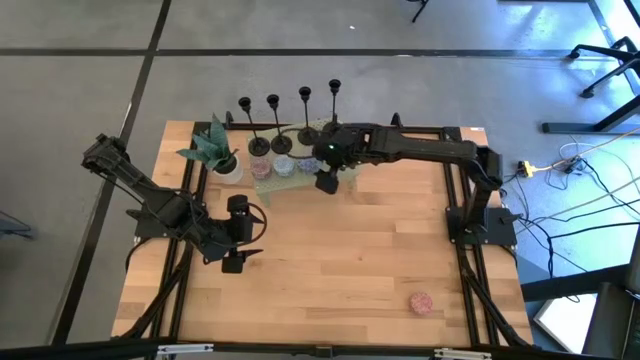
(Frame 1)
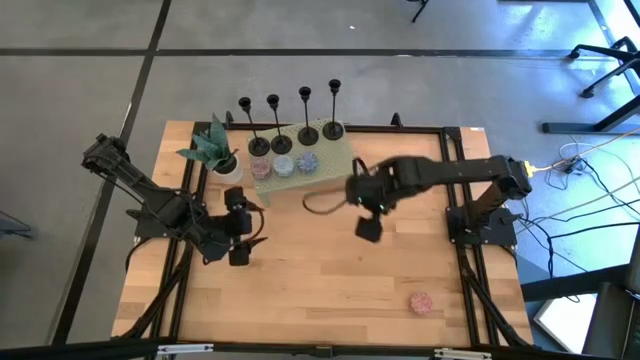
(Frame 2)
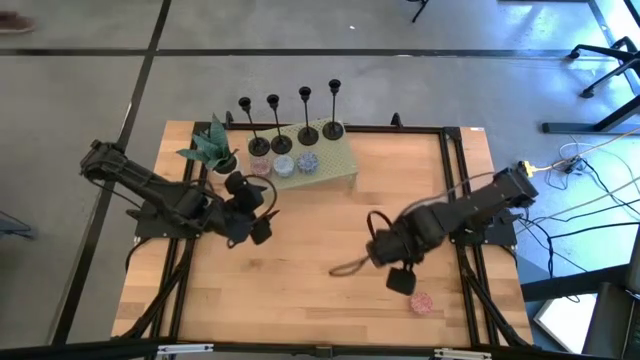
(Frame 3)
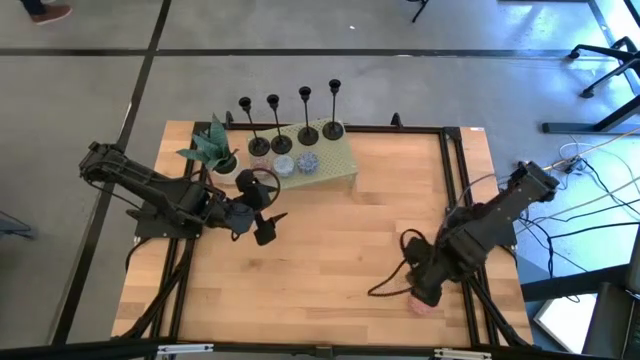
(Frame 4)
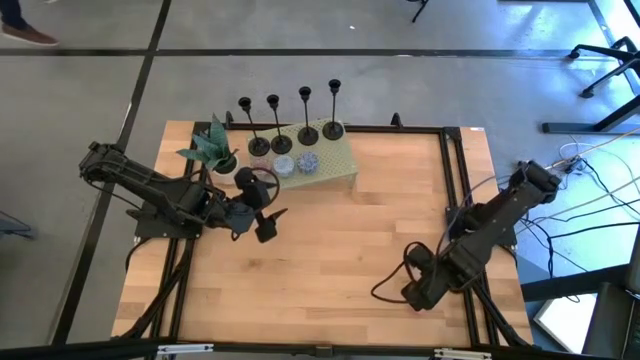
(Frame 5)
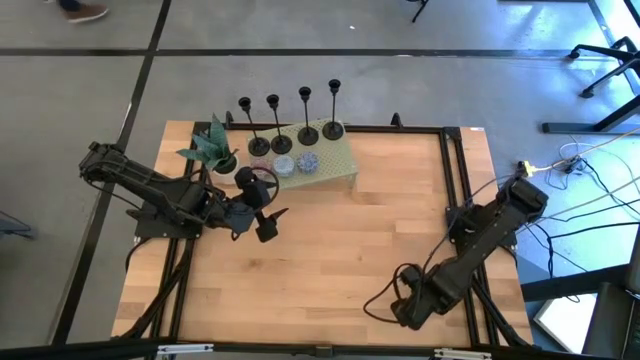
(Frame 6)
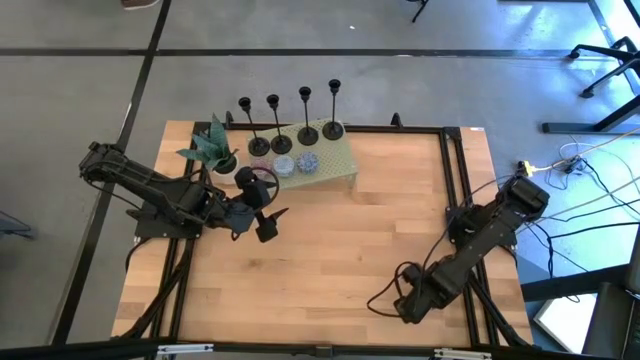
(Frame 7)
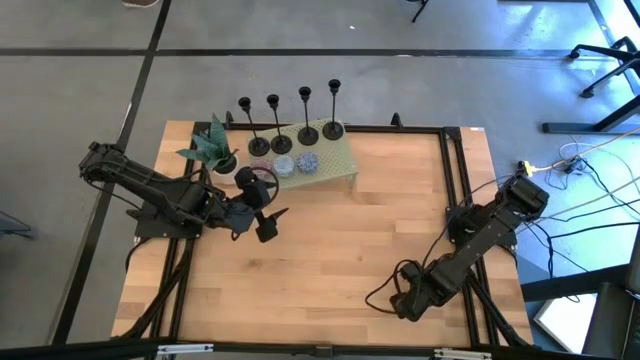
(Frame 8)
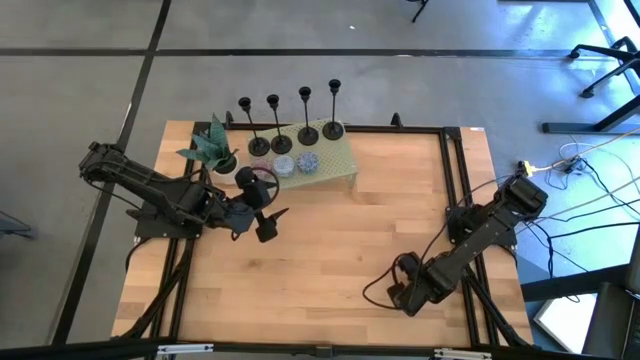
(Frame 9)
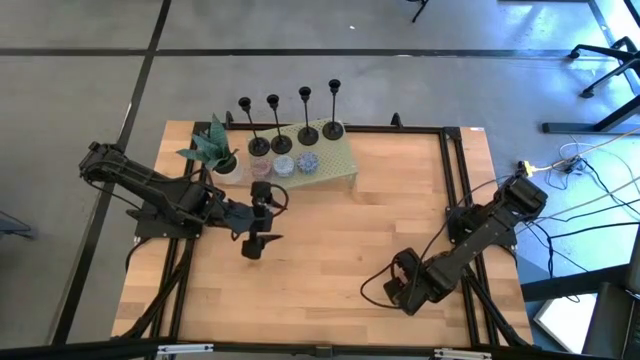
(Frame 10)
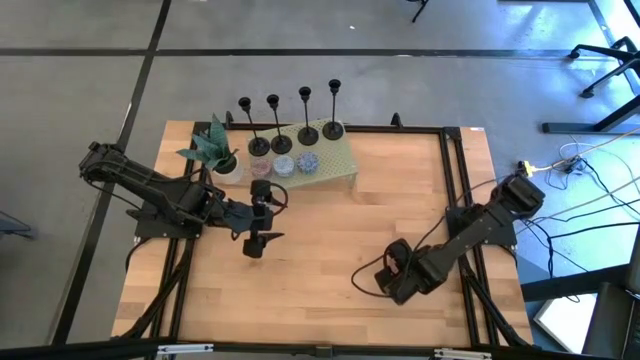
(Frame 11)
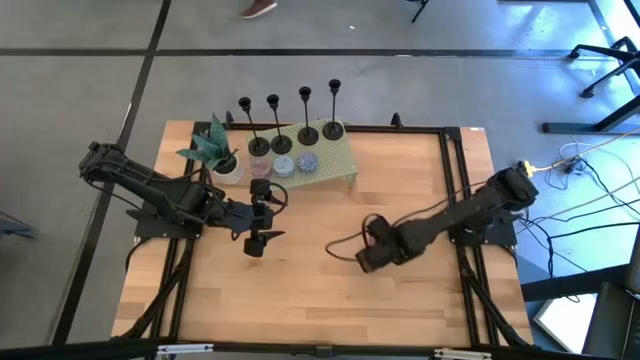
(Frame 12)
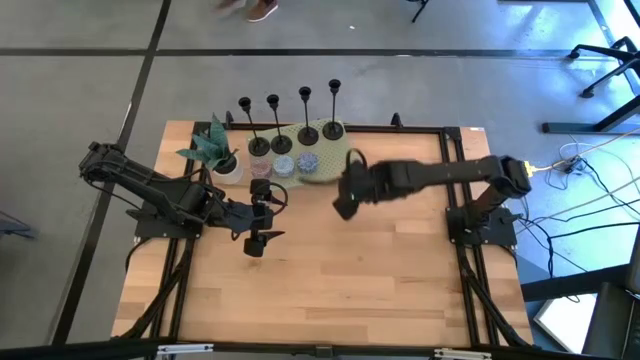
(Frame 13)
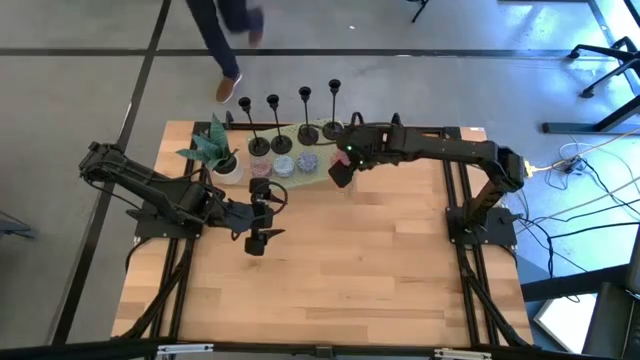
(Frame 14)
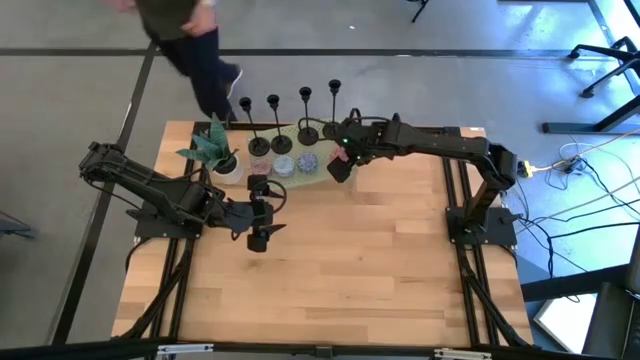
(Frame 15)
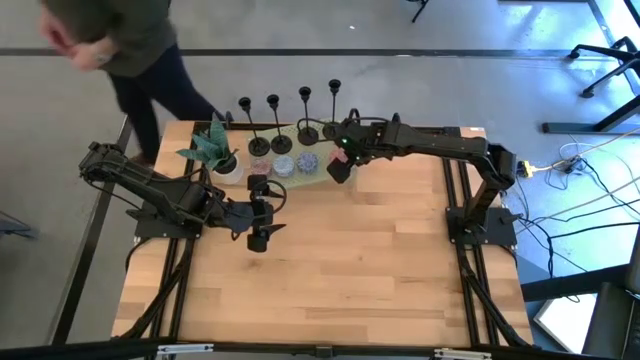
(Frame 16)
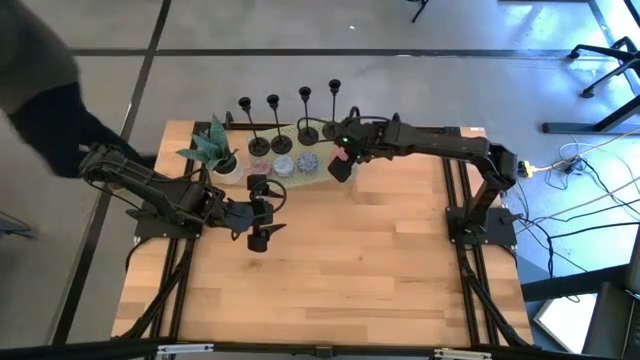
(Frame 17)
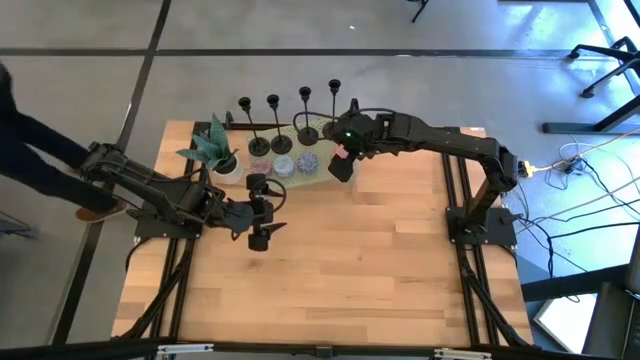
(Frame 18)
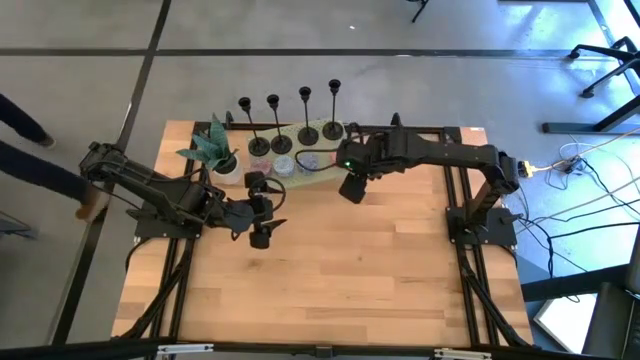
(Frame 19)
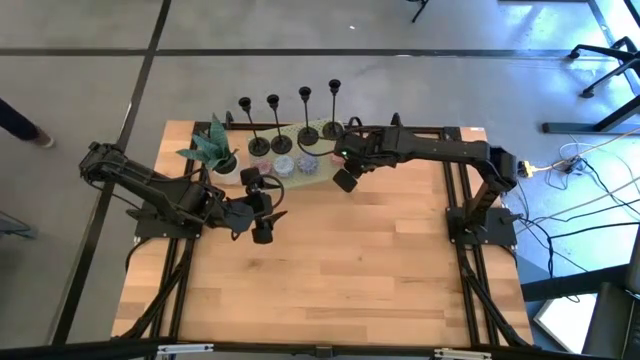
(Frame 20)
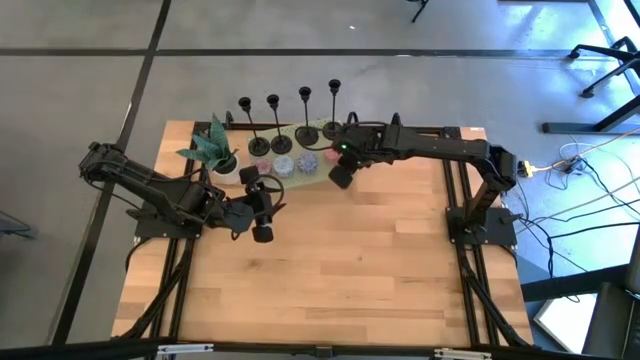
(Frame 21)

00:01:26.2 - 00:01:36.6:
Task: Pick & Place candle stick holders
Put the red scented candle on the shelf

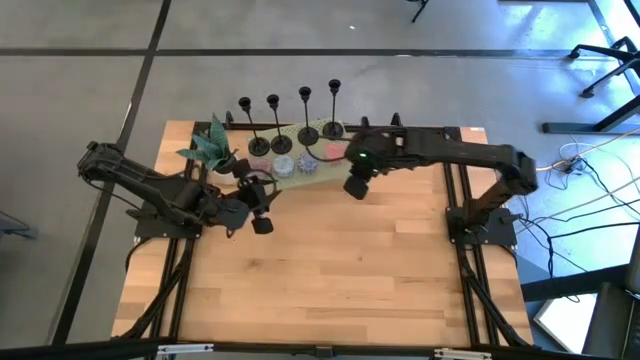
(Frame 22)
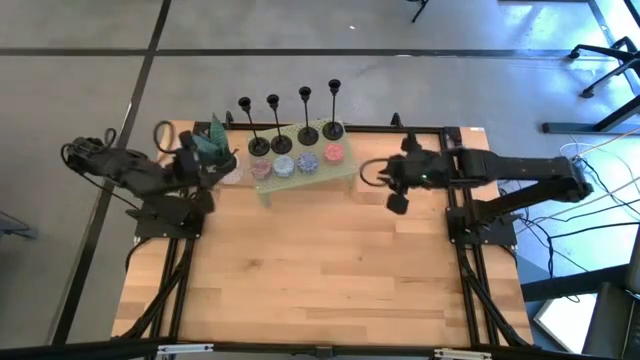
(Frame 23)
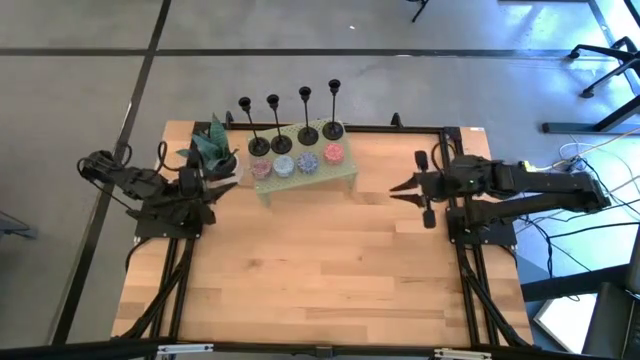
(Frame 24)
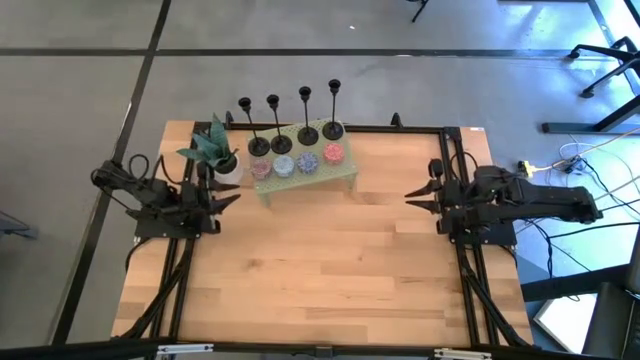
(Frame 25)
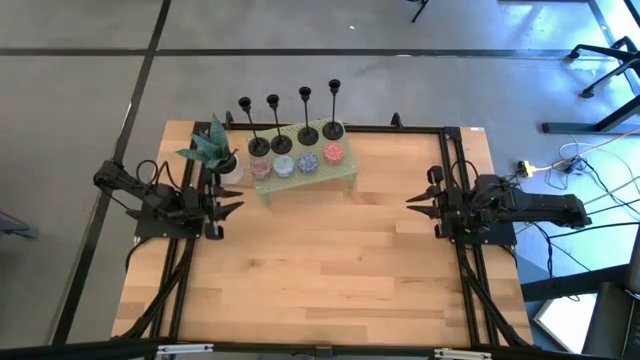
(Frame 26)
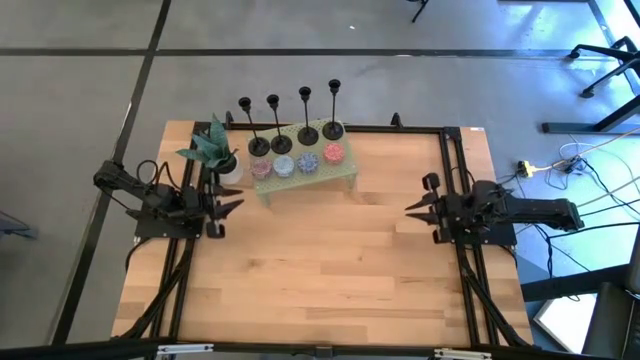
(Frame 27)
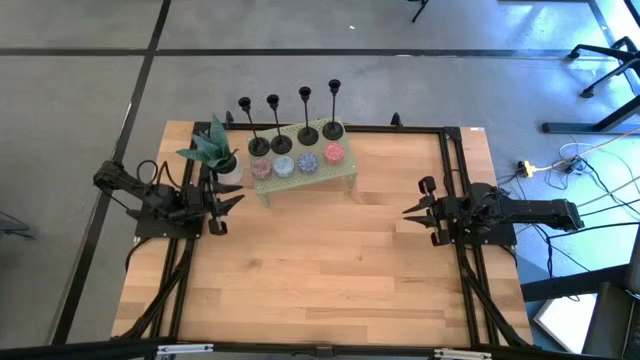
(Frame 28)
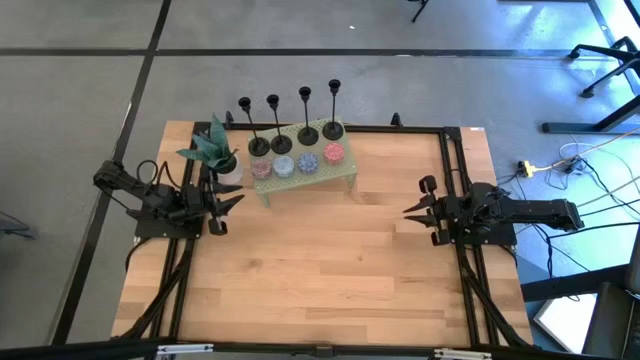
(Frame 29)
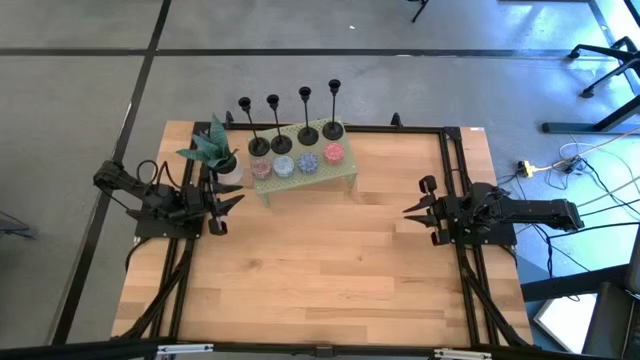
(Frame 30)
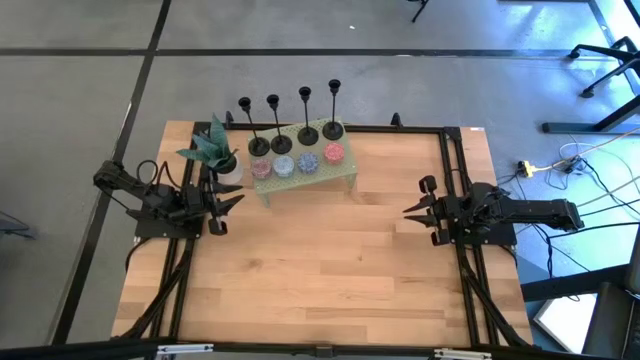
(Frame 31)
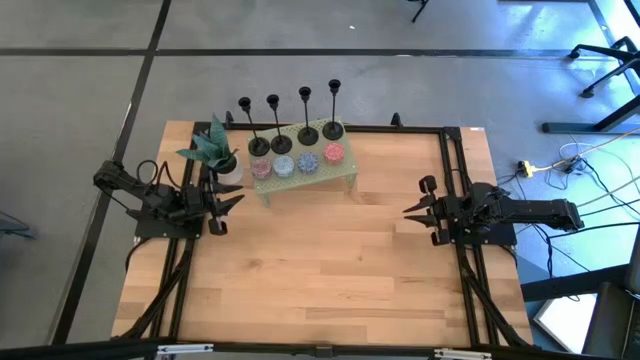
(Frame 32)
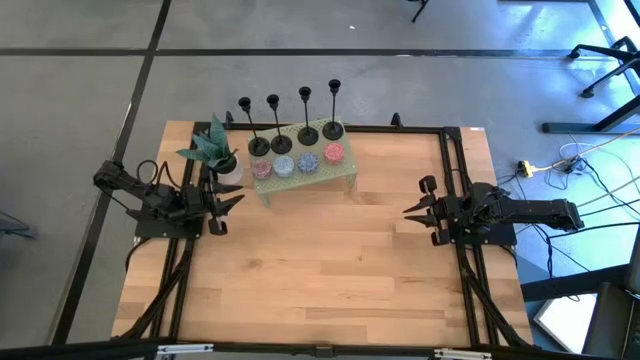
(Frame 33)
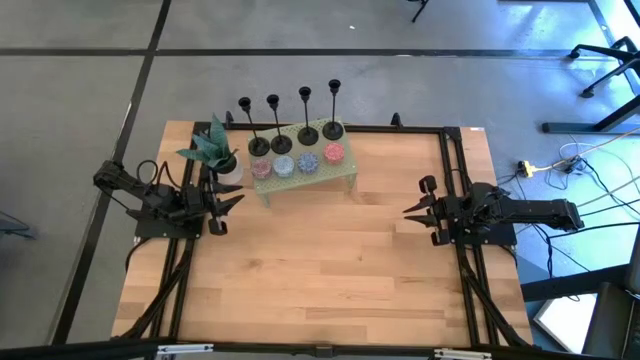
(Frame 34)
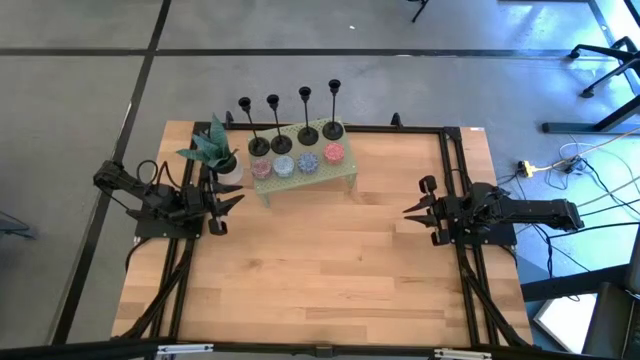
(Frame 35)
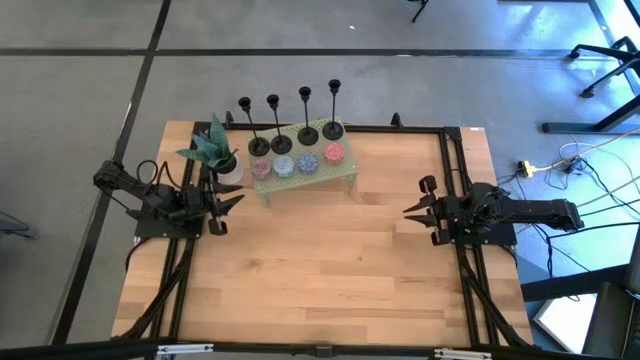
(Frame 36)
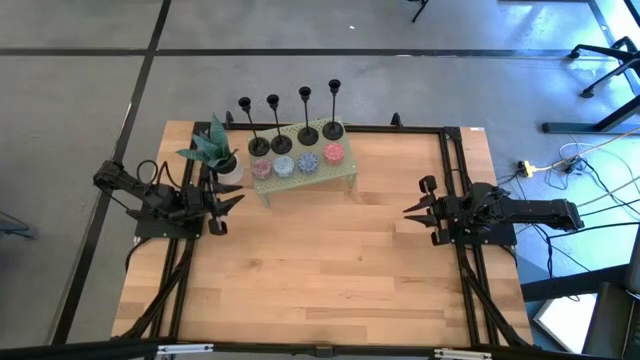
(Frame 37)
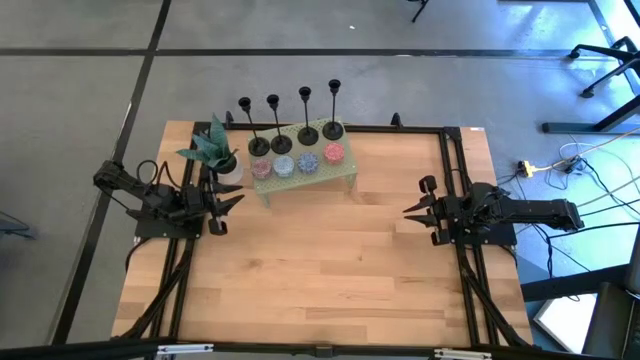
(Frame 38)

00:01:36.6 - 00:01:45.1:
Return to Home Position

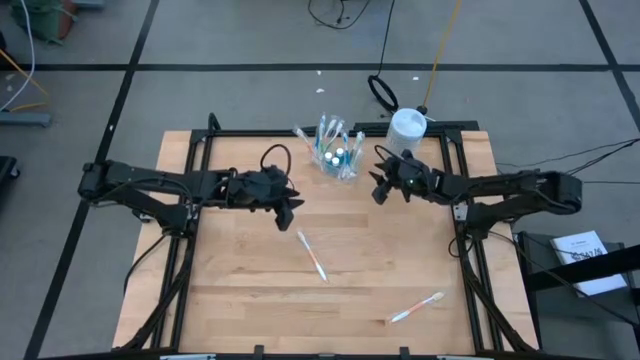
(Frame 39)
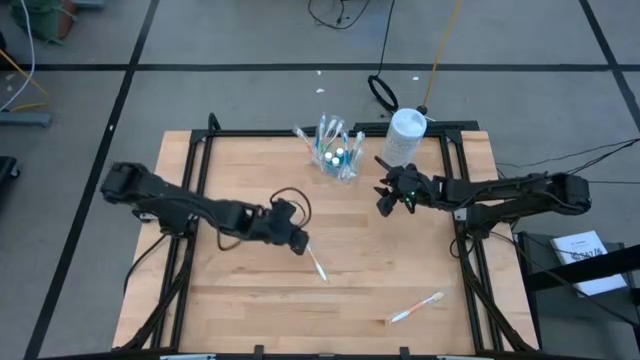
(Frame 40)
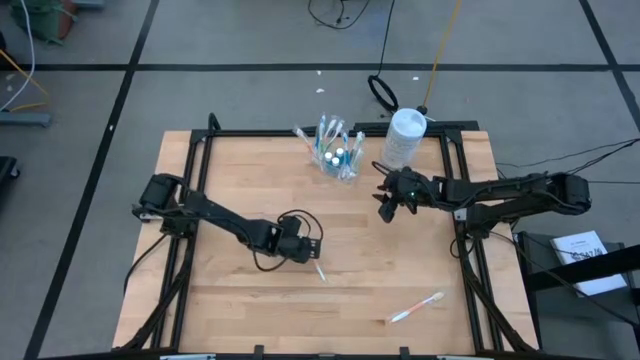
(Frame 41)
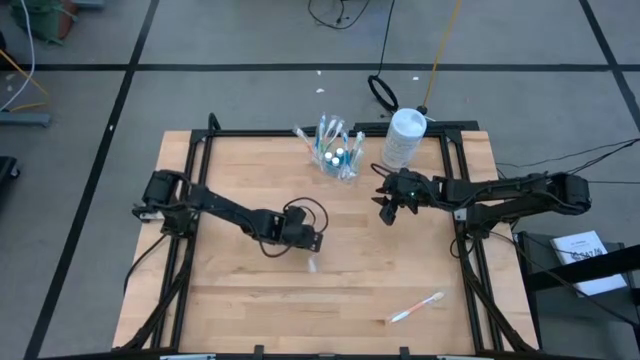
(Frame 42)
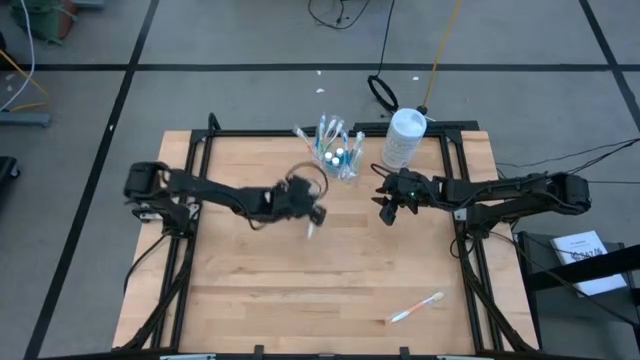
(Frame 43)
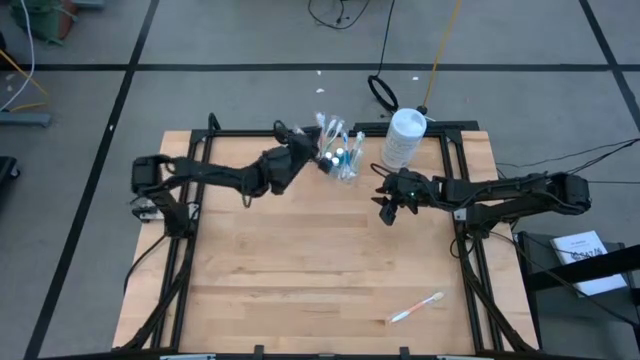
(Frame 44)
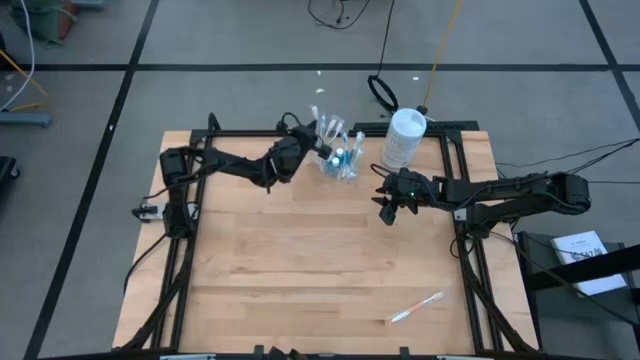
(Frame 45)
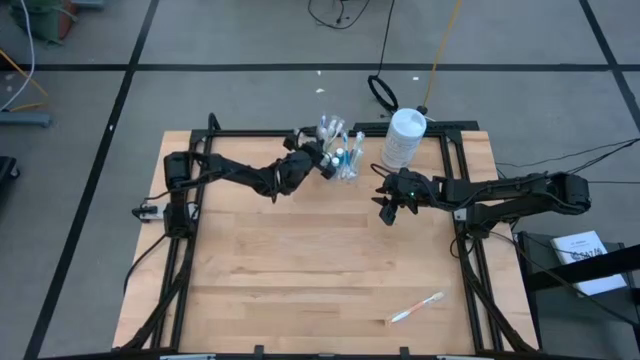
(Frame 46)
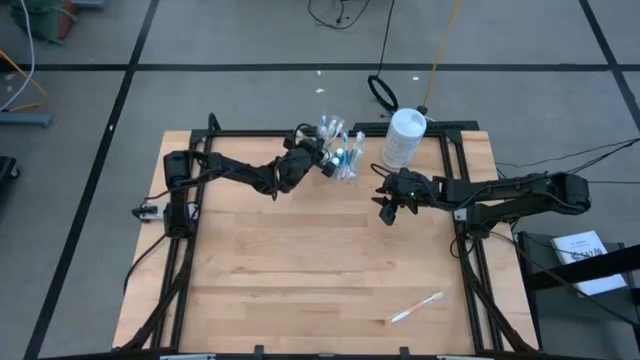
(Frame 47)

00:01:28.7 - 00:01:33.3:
Task: Pick & Place toothbrushing station
Put the orange toothbrush into the transparent organizer
